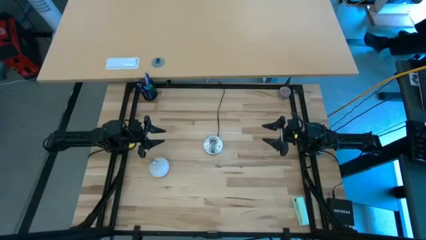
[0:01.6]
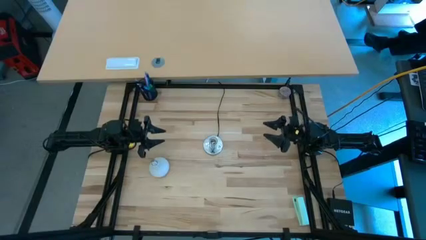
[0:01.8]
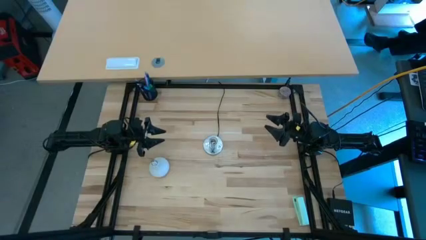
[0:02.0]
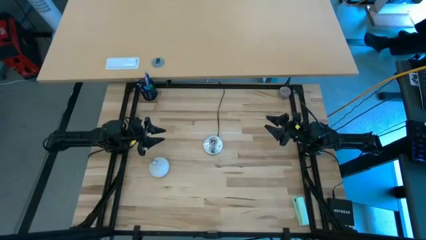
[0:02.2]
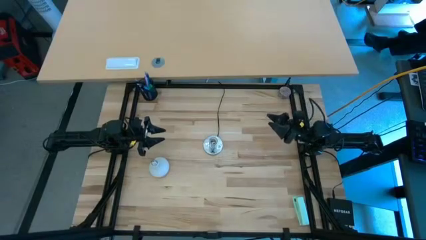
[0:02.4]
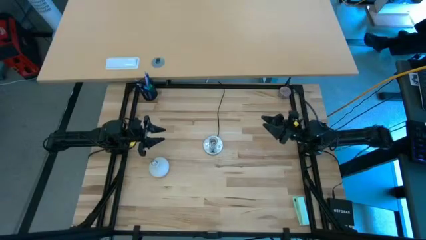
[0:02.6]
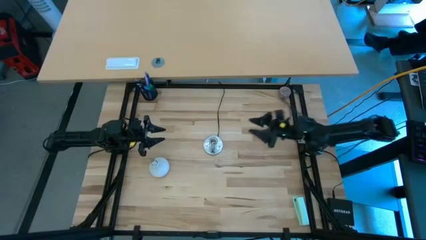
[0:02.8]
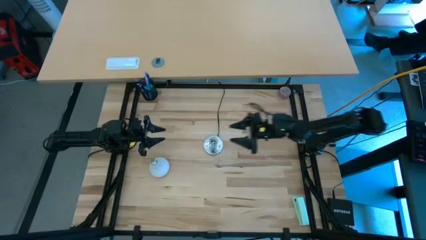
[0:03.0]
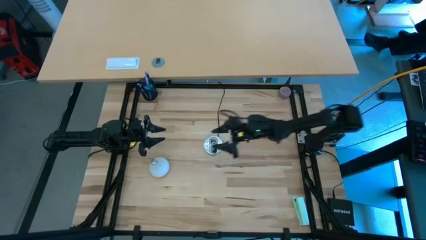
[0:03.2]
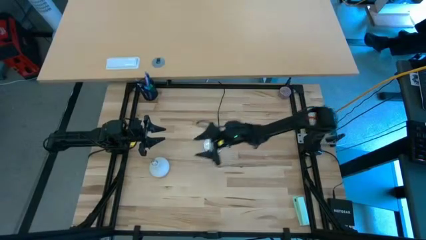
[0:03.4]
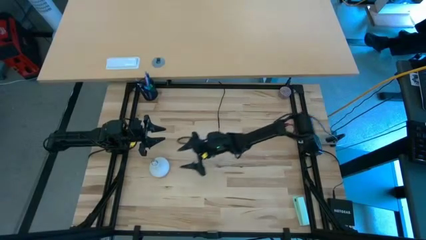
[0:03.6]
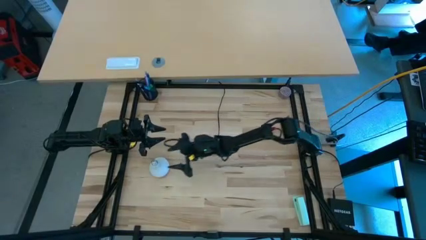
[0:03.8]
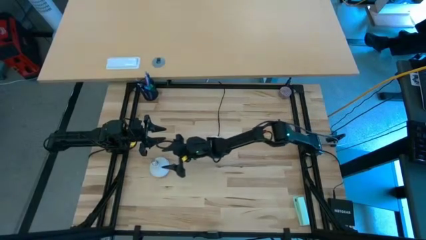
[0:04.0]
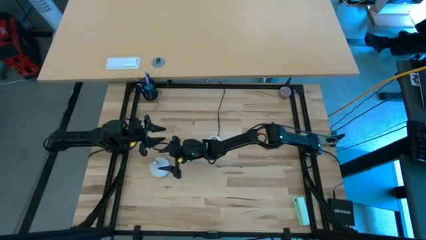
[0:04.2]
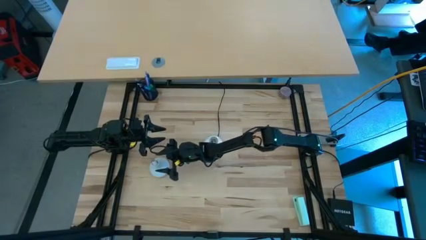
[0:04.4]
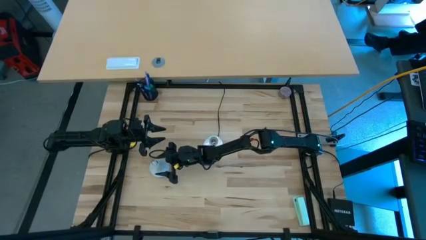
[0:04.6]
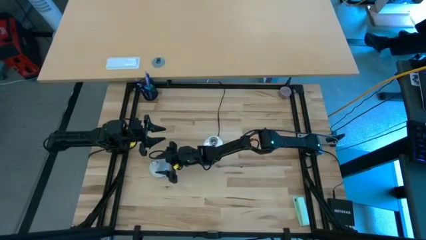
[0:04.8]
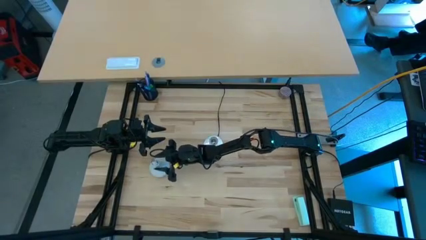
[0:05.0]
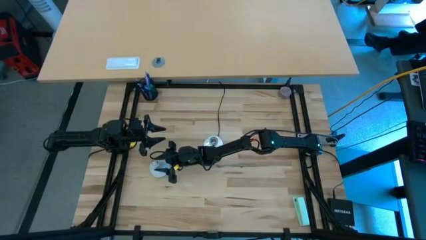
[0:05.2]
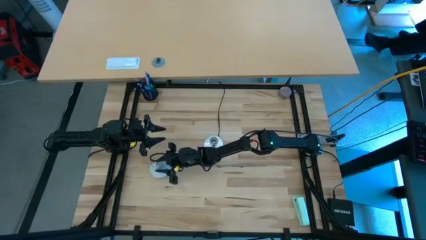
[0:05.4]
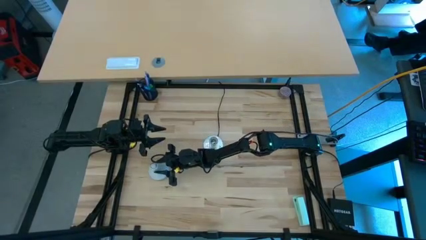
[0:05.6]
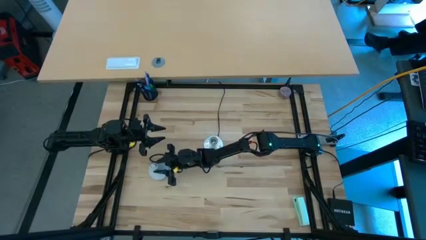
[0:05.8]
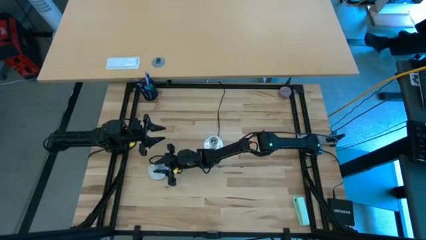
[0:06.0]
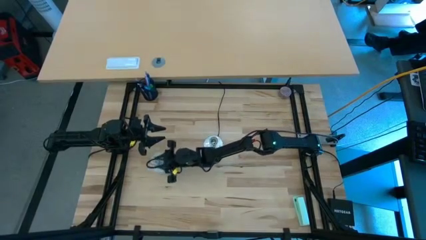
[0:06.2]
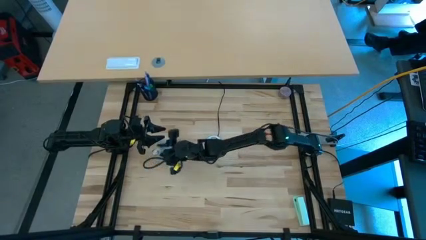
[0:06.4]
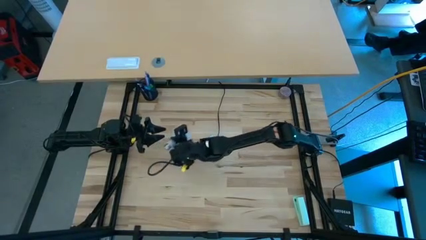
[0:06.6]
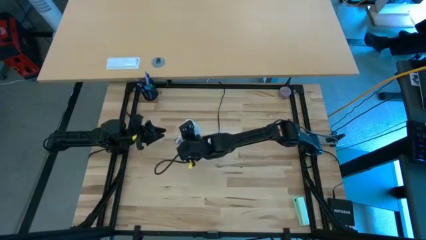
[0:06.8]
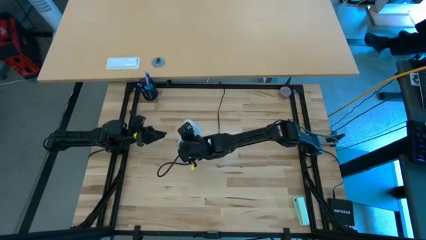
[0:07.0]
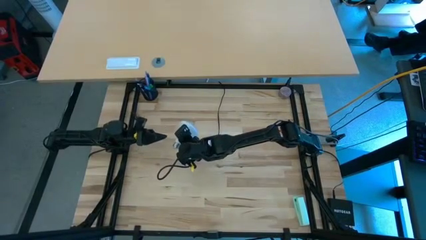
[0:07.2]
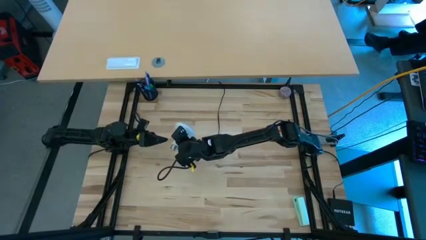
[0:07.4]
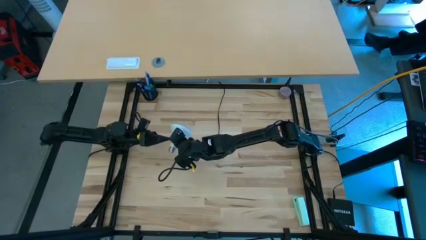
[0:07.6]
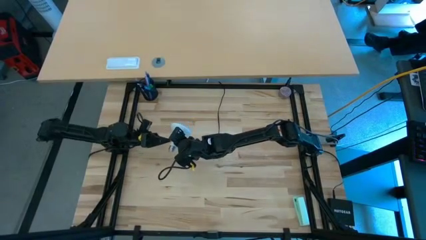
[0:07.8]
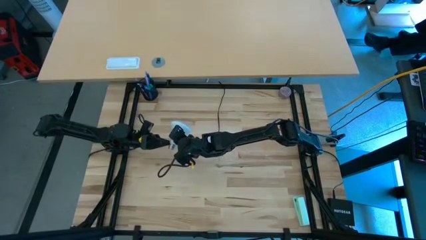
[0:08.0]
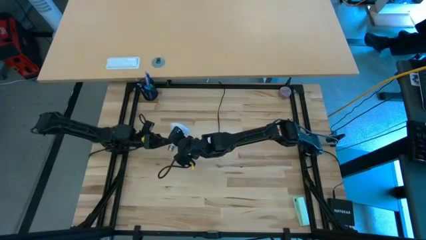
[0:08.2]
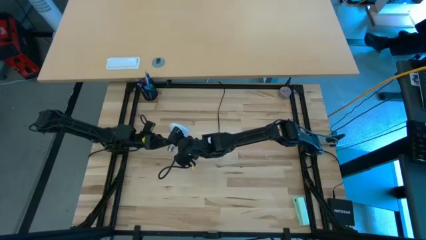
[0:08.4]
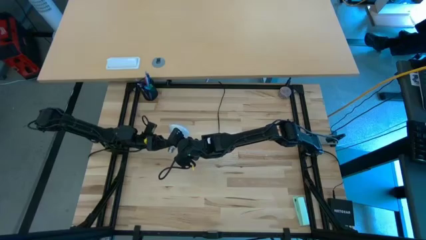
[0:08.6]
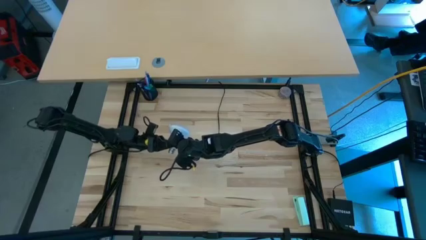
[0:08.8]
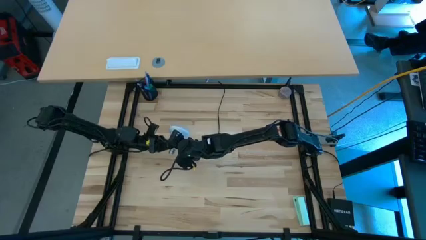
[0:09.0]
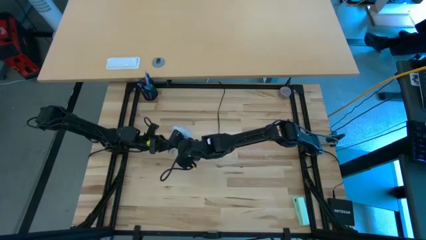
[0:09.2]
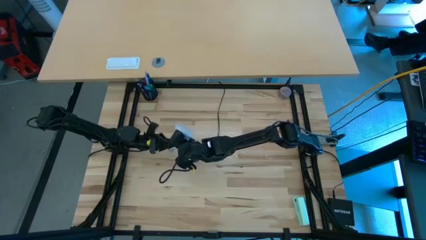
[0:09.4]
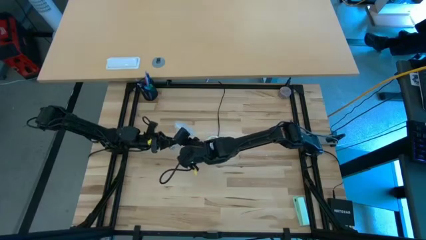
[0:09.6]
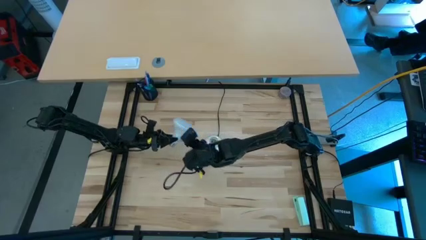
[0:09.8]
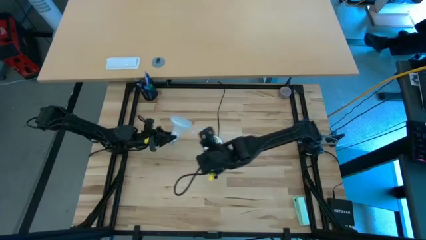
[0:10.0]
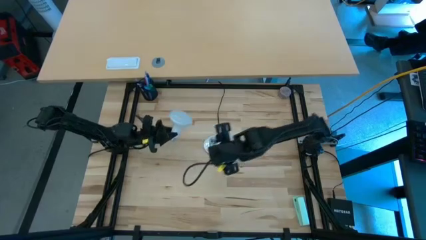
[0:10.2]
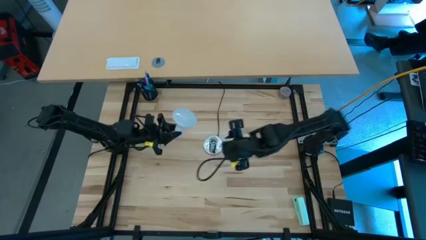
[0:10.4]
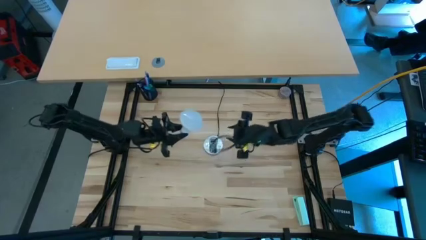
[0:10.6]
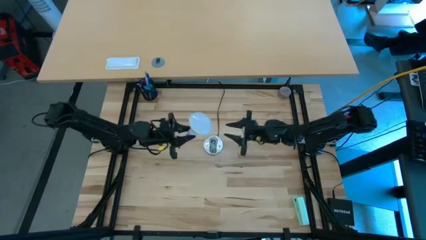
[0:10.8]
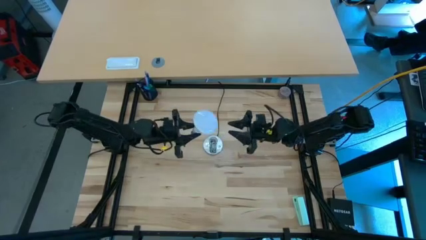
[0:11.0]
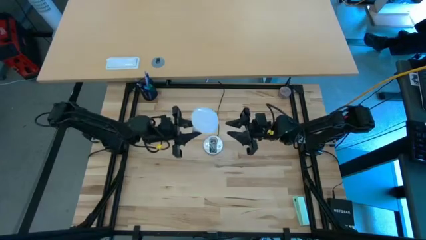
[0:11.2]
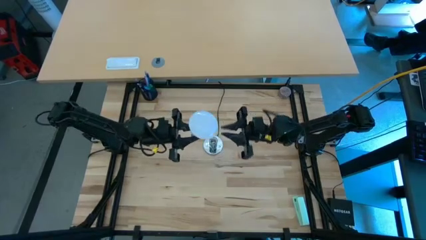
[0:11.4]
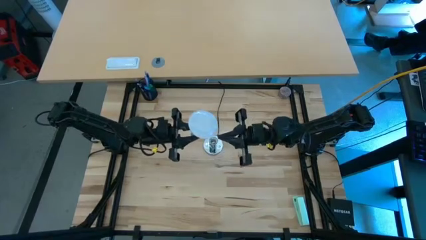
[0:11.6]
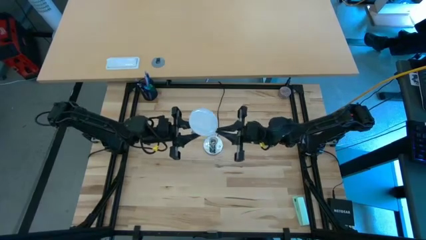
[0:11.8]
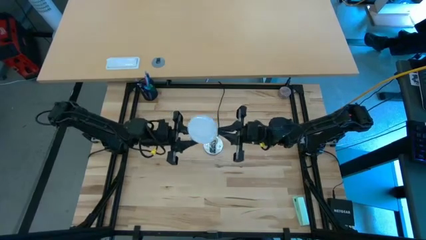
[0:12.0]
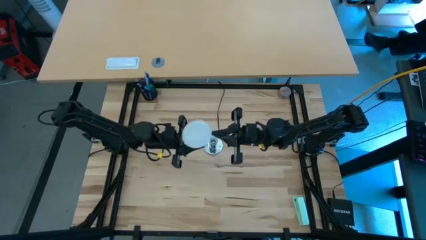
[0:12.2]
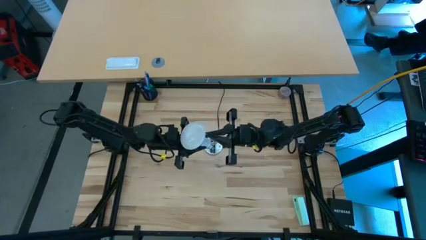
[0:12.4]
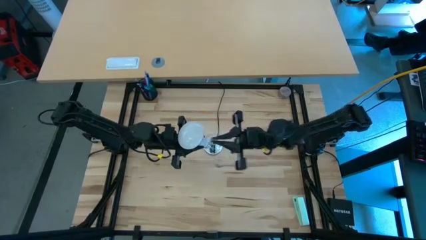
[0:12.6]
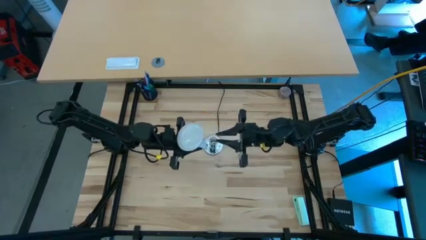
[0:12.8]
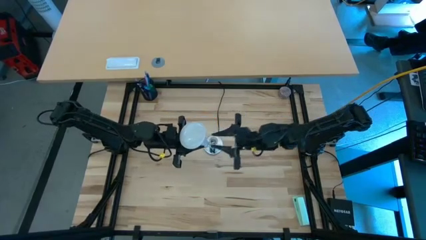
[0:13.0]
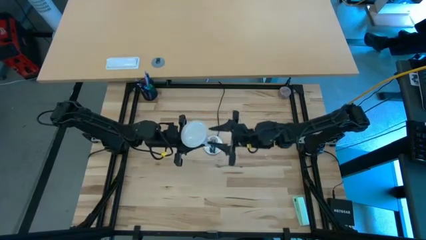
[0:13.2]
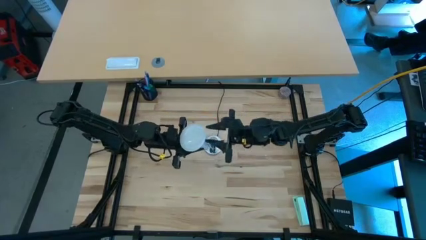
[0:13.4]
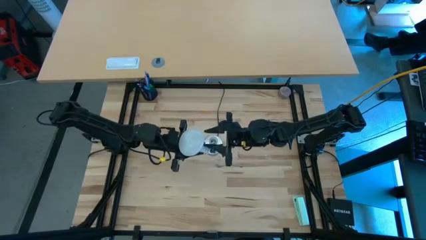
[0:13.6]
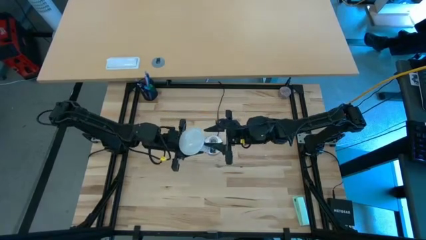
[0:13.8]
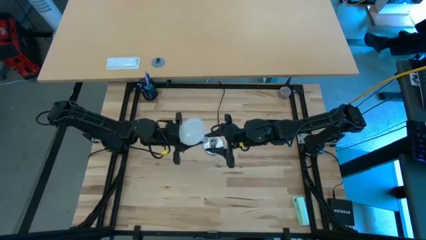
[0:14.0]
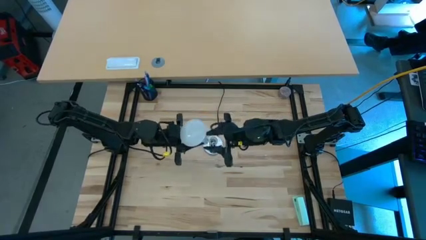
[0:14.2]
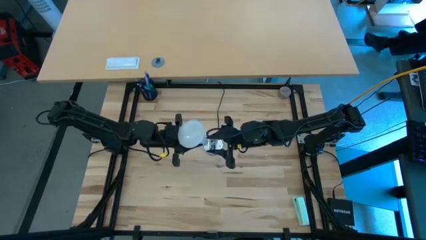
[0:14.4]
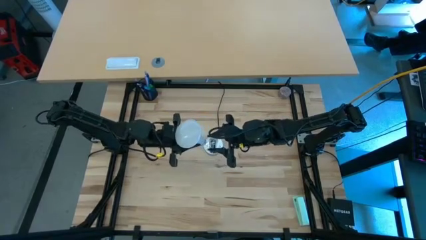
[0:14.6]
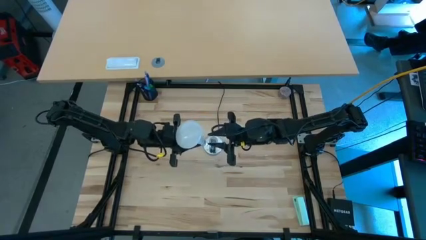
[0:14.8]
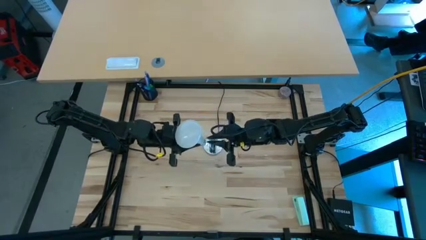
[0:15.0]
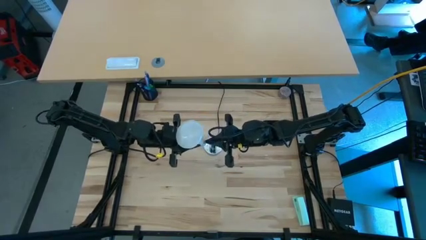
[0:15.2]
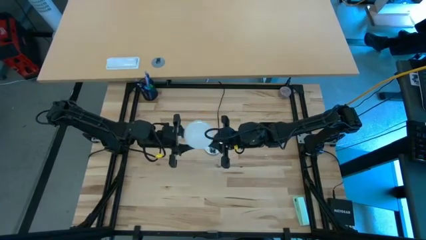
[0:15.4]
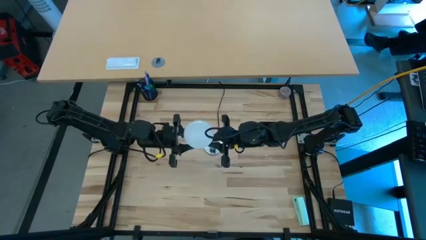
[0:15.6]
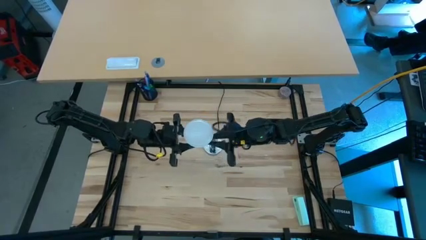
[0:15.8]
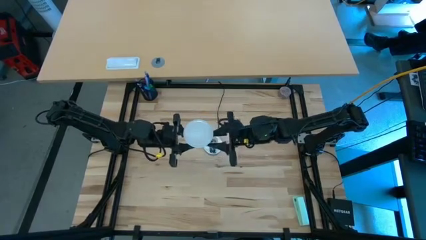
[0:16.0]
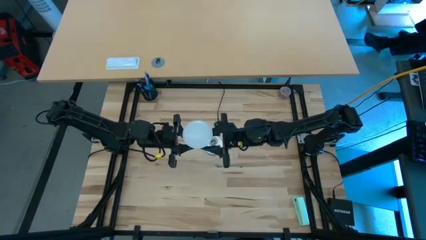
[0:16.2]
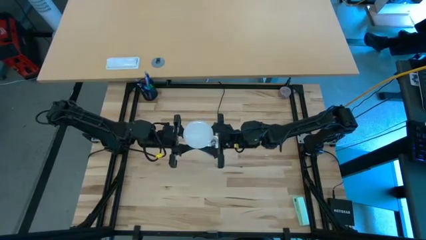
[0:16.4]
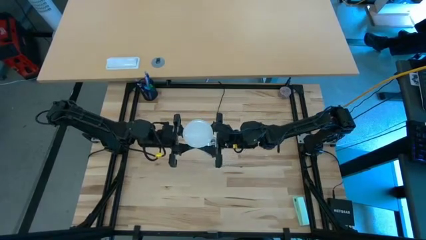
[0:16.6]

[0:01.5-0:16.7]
Task: Screw lightbulb
Insert the lightbulb into the lamp
